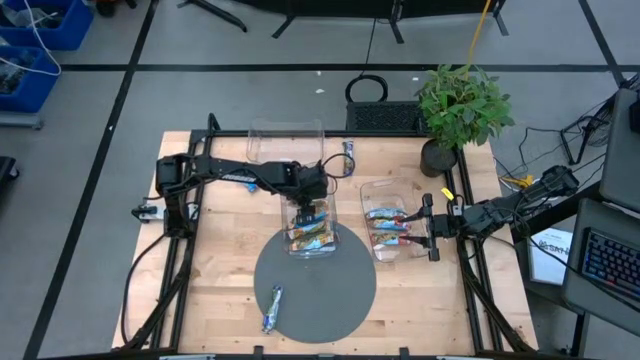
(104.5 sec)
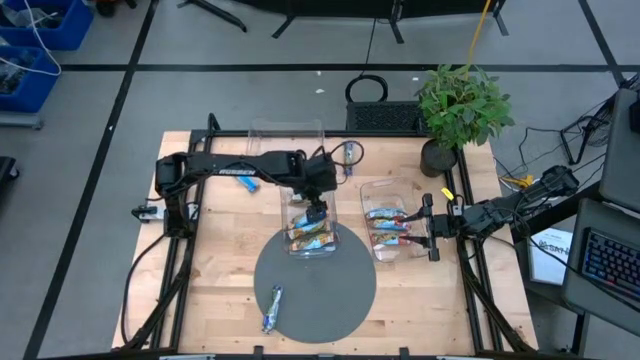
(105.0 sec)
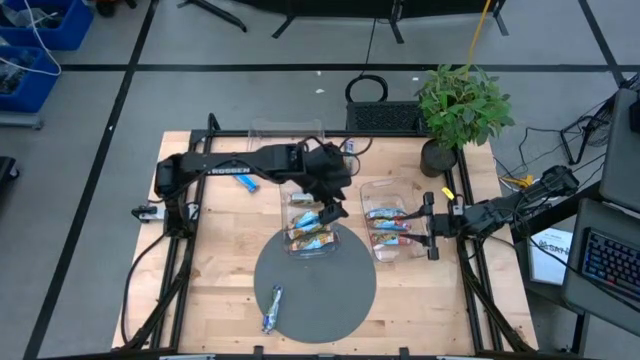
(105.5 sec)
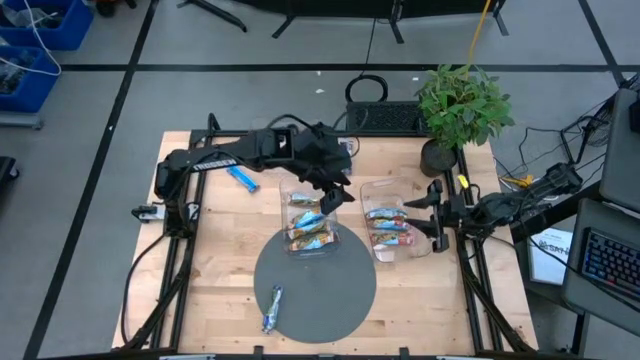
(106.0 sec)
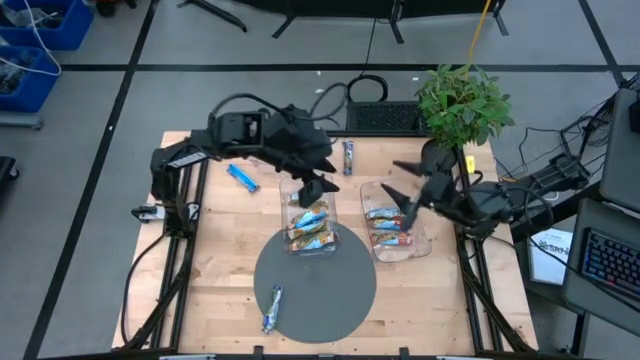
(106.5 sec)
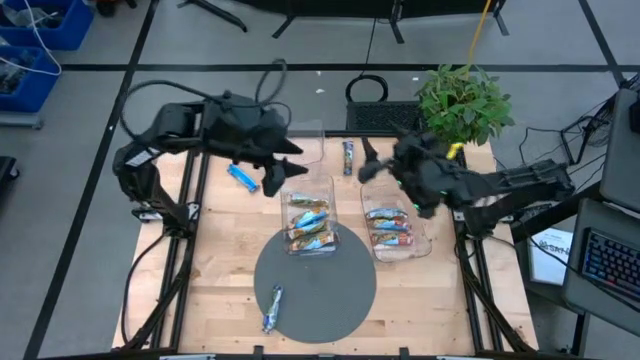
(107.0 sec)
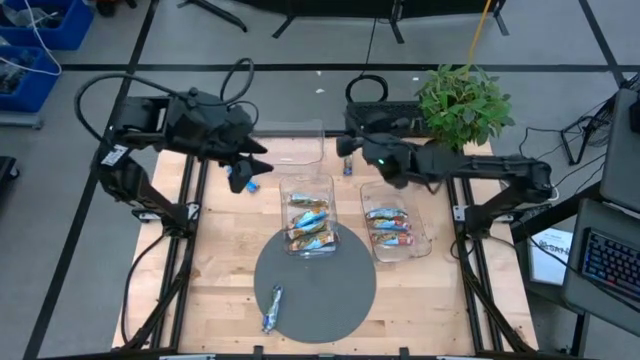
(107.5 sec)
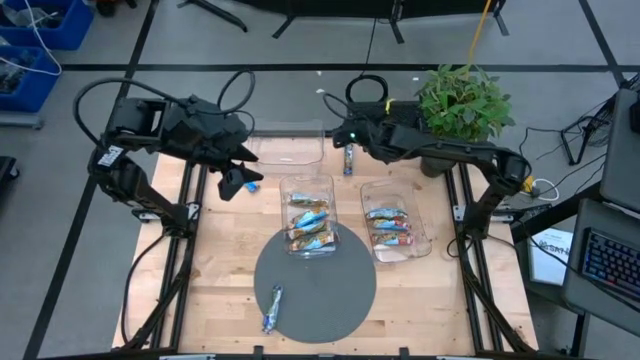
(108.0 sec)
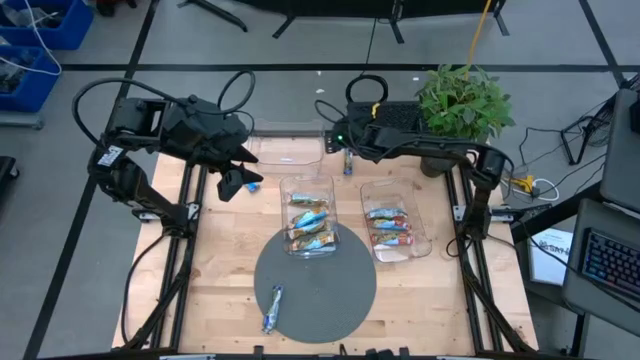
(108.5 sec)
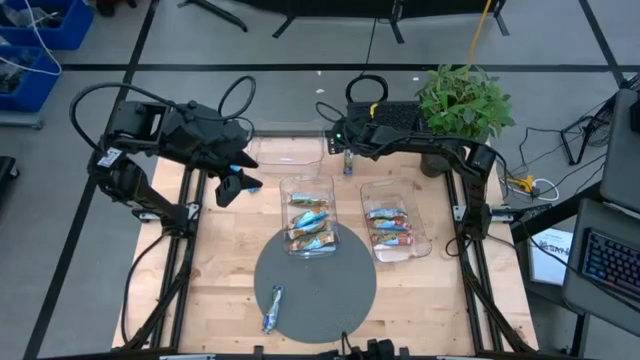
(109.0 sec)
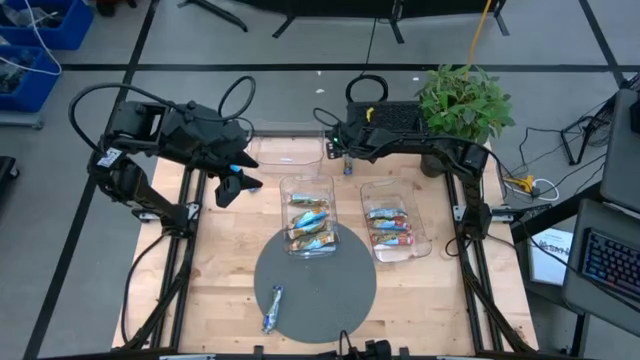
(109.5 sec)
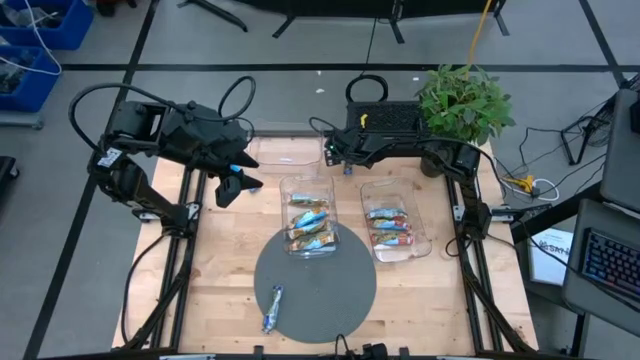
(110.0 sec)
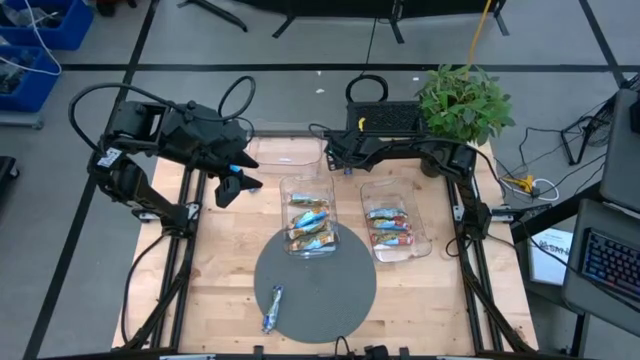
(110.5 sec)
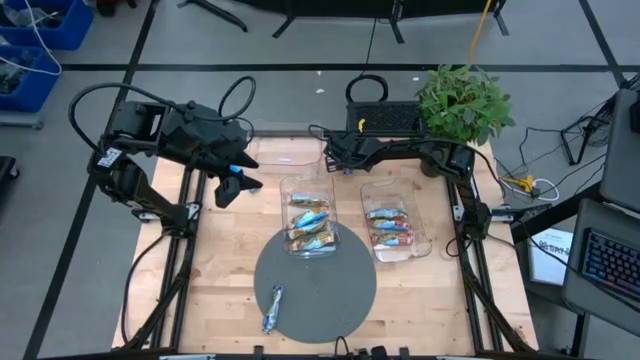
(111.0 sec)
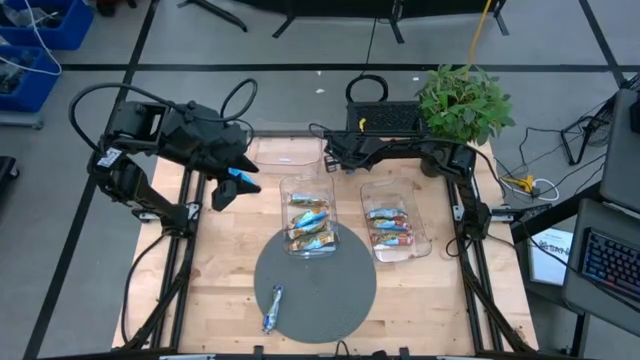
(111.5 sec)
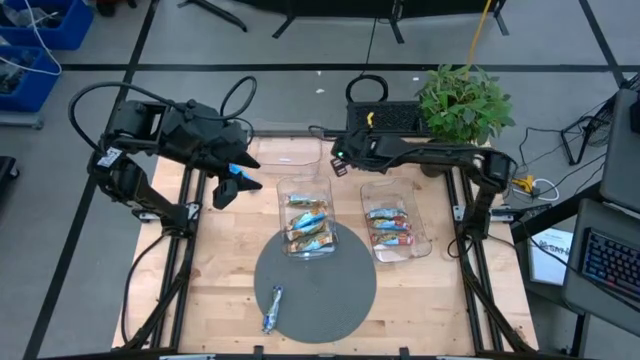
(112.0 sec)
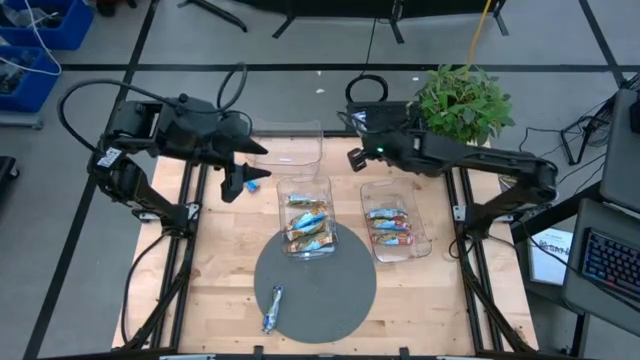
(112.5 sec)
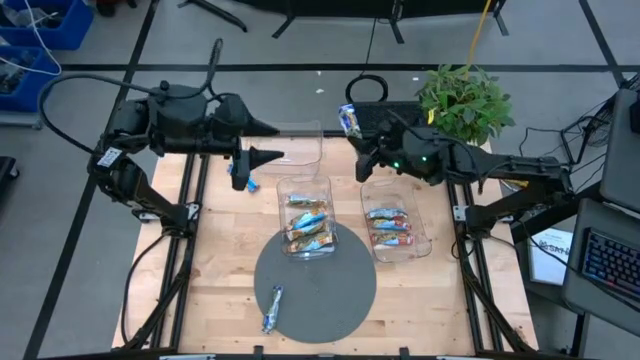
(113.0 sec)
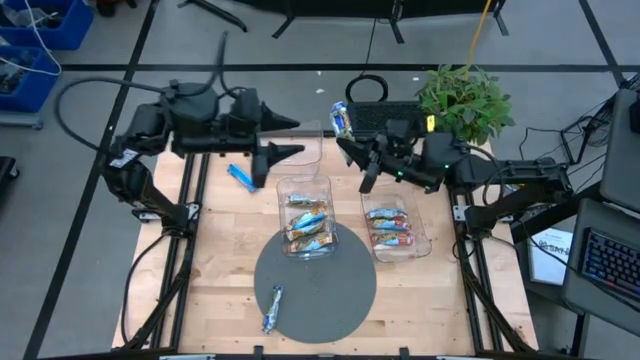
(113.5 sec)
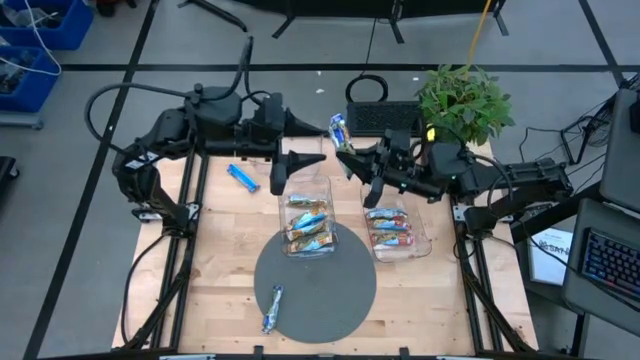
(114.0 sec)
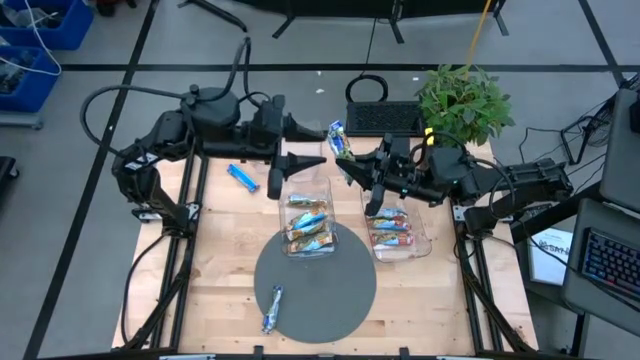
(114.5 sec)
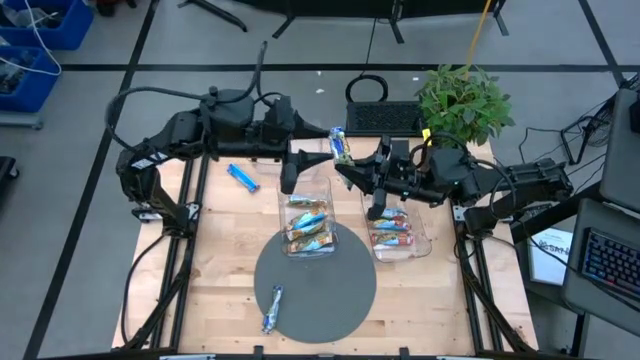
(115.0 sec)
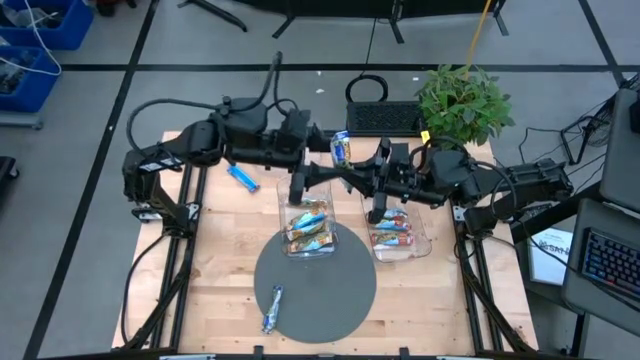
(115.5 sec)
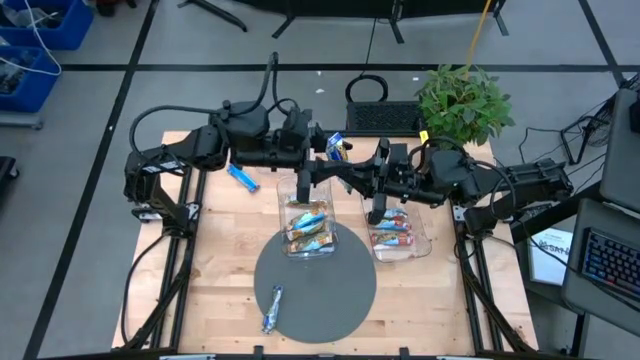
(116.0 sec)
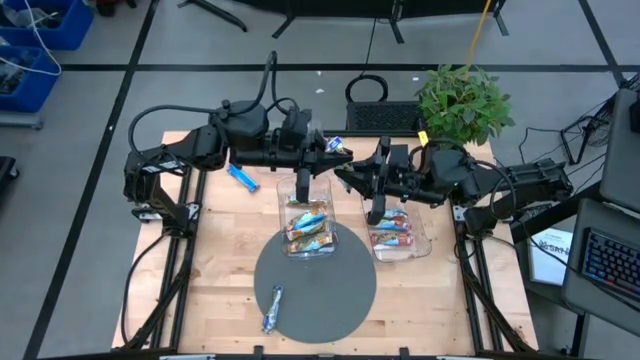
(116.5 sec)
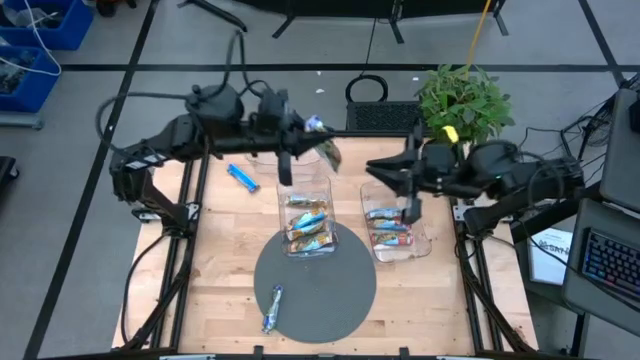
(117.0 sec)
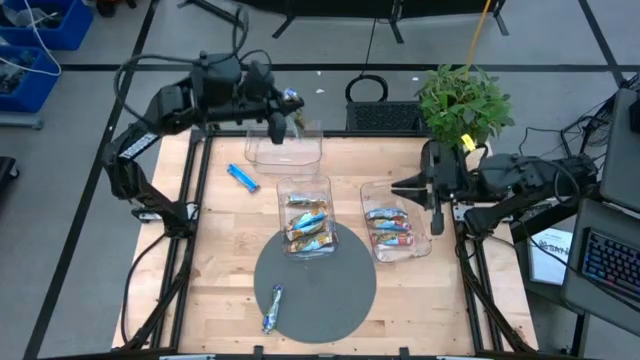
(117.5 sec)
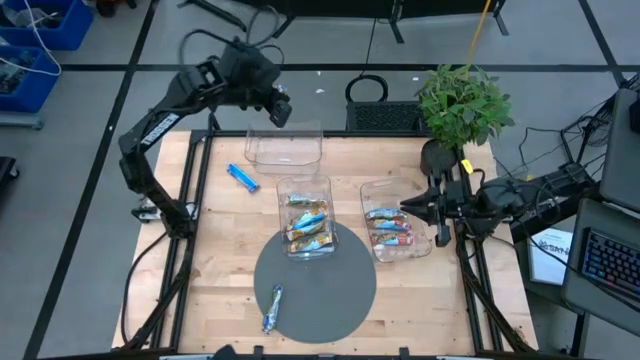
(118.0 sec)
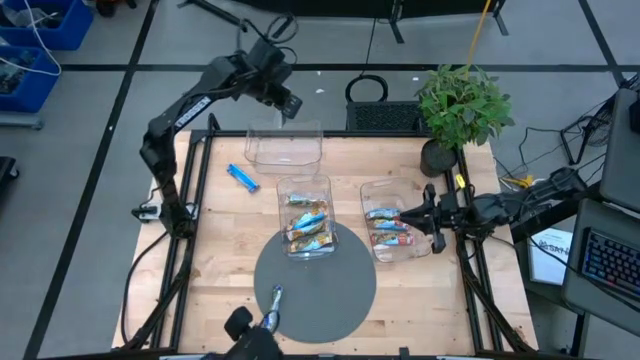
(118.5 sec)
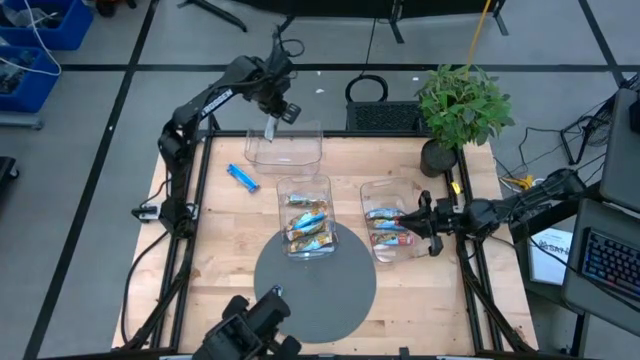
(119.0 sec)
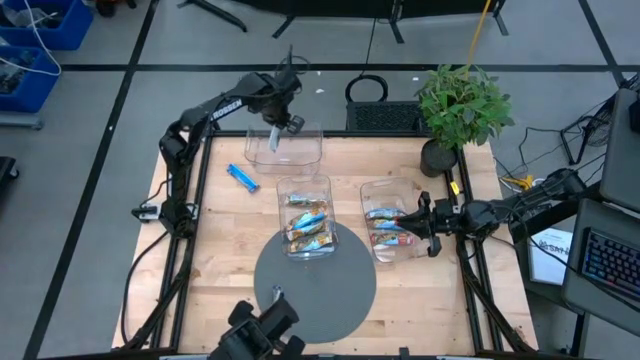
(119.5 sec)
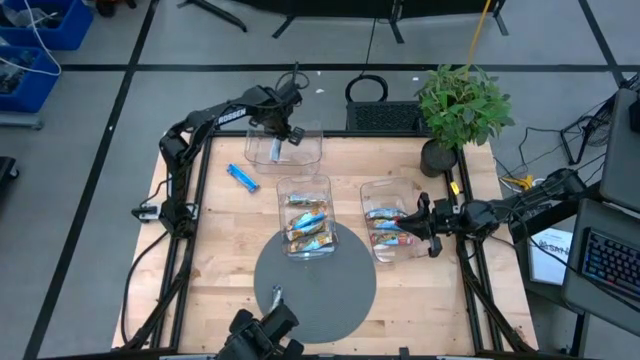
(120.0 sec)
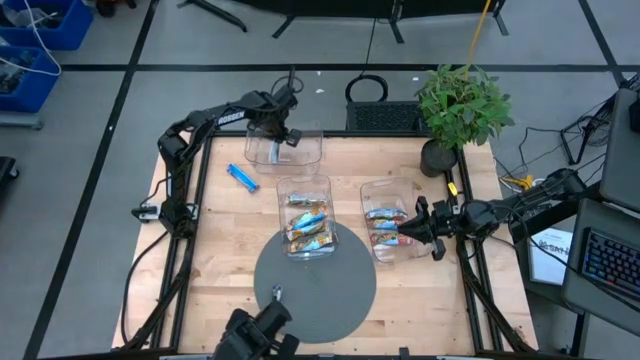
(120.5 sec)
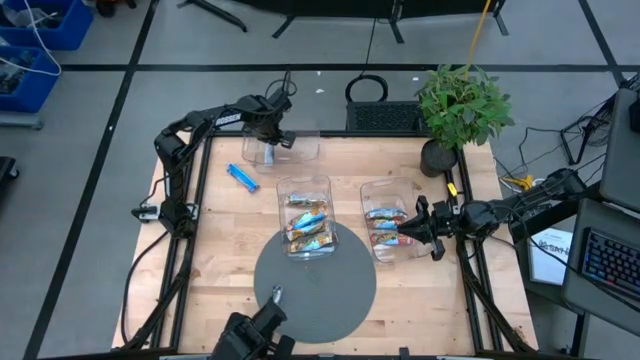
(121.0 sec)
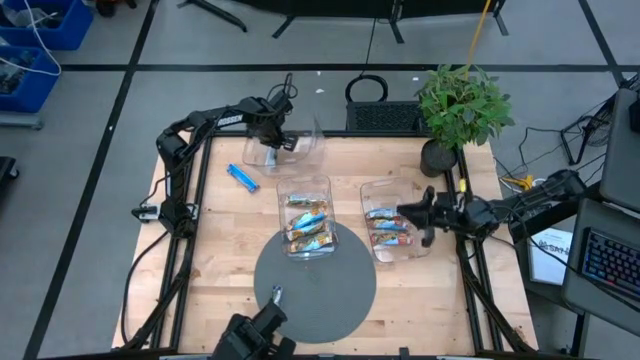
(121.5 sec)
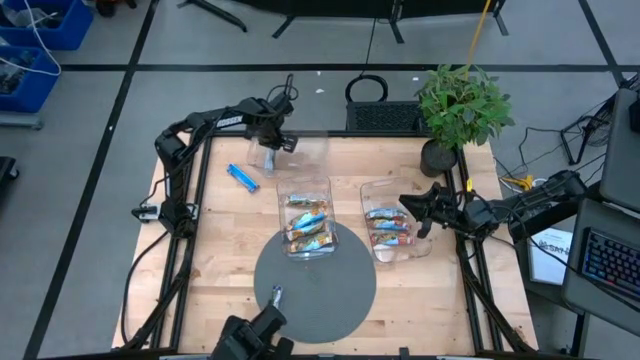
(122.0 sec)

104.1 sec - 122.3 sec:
Task: Pick and place Granola Bars by type
Put the blue granola bar into the top transparent bin

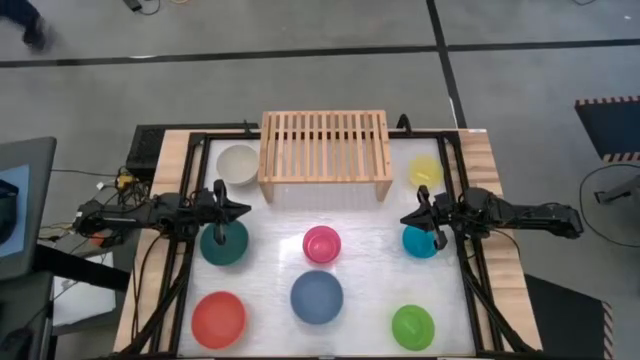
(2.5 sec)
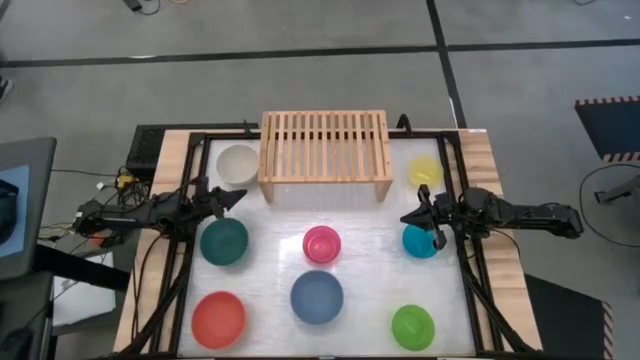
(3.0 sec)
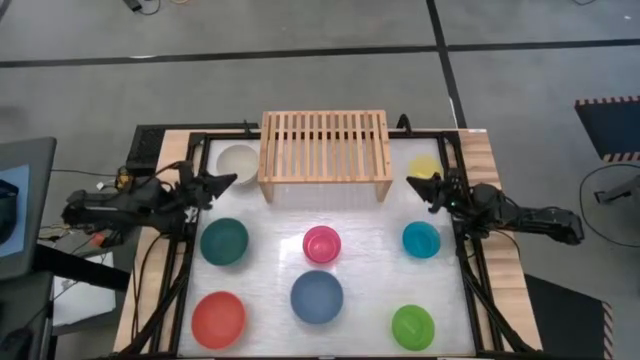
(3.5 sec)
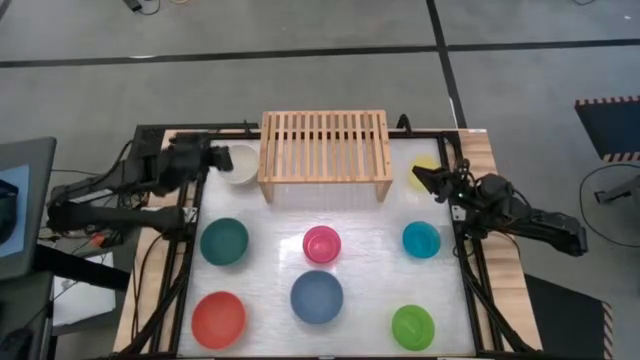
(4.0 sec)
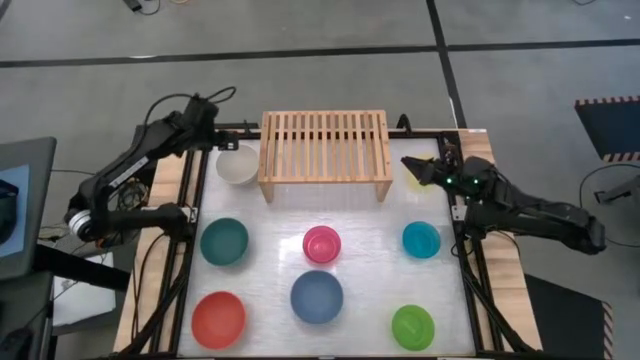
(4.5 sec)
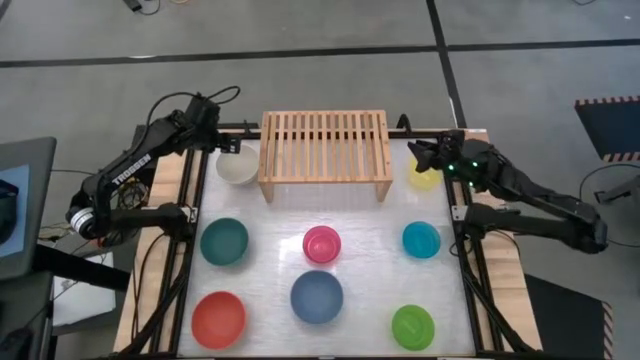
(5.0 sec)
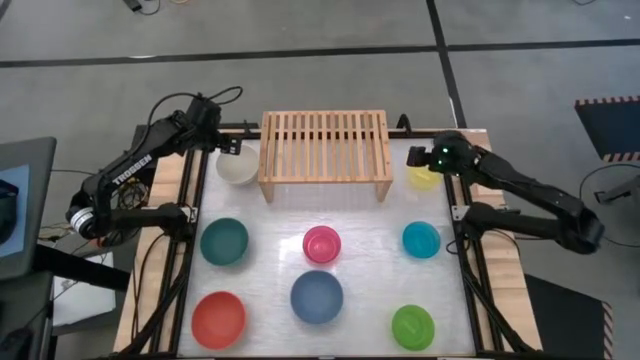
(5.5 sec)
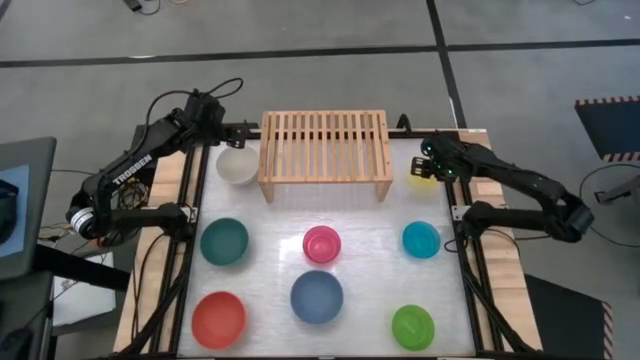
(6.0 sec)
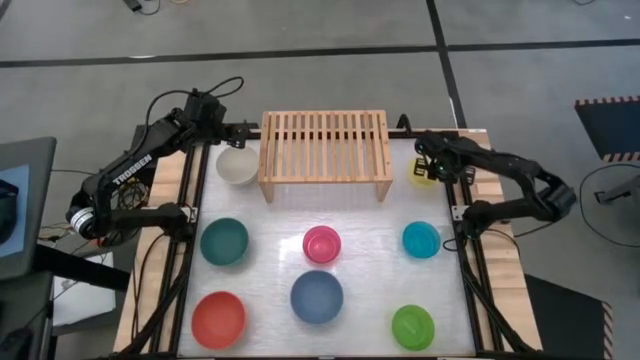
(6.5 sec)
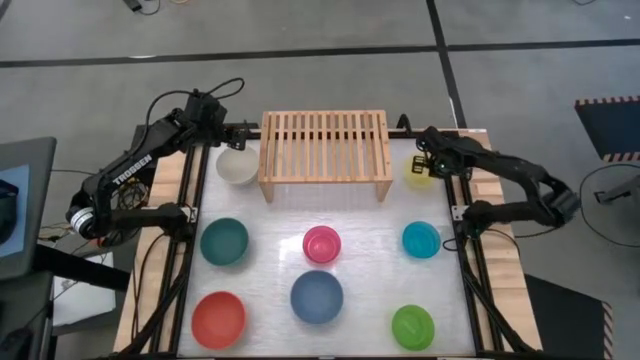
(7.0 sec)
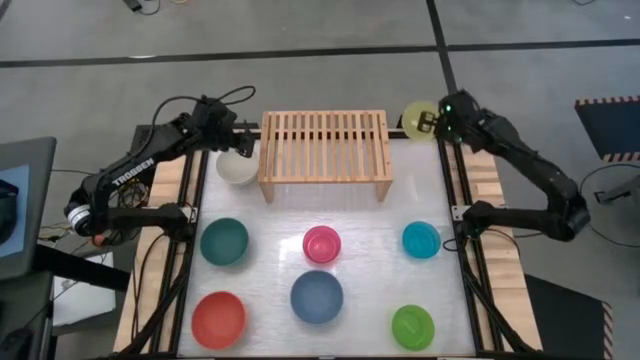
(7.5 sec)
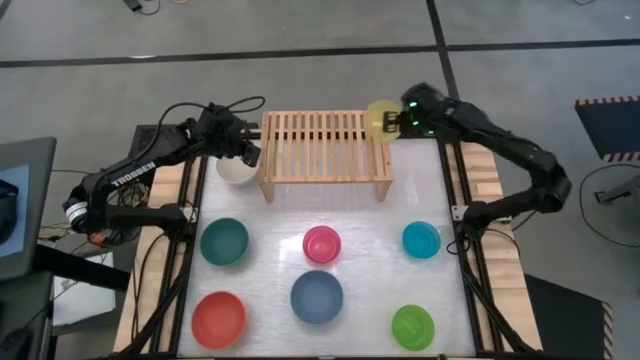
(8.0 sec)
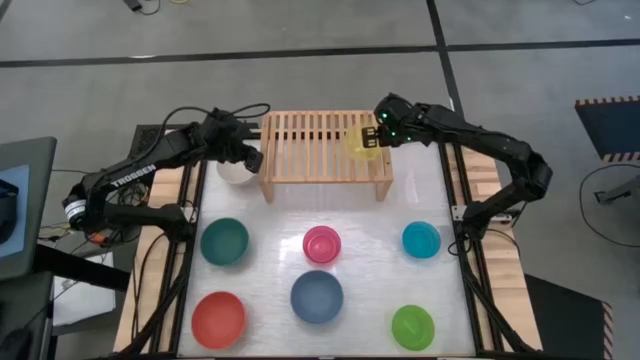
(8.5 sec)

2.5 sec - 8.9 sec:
Task: Place and stack bowls onto a shelf
Put the small yellow bowl on the shelf
